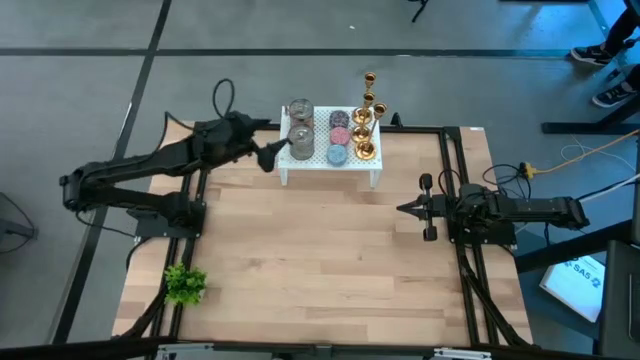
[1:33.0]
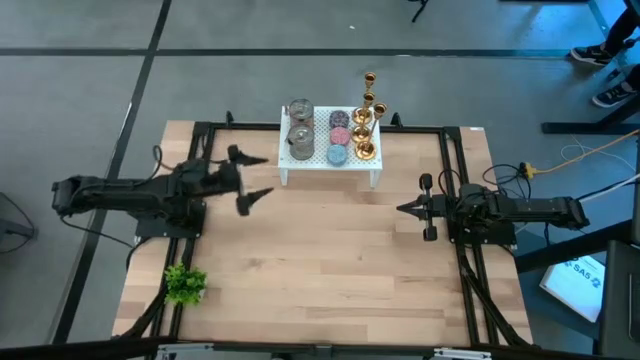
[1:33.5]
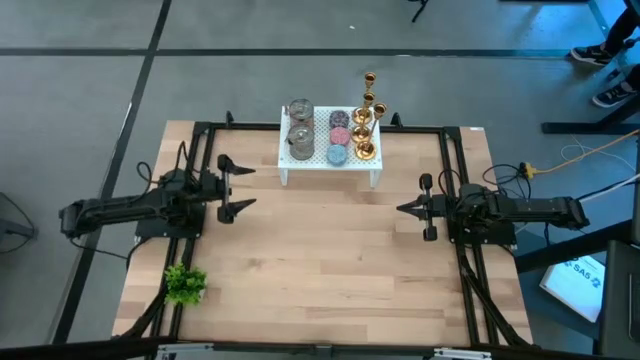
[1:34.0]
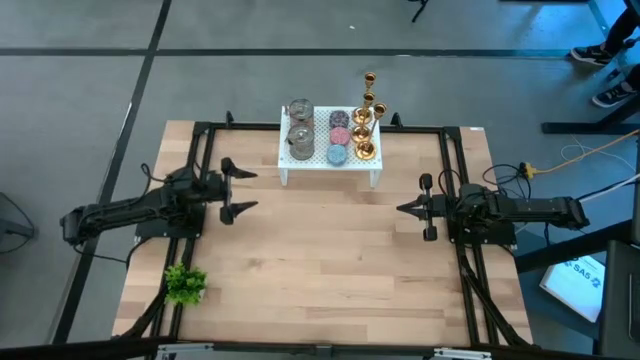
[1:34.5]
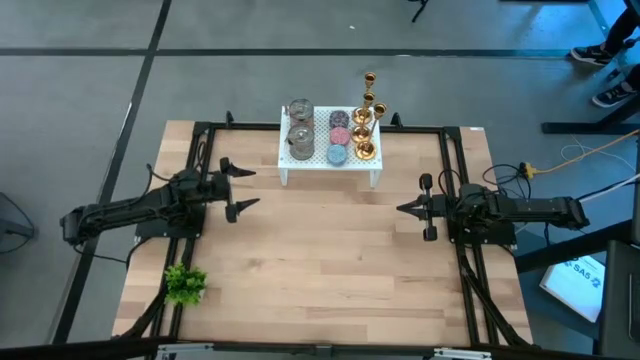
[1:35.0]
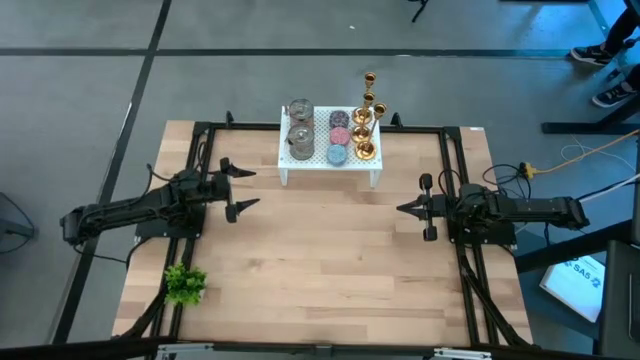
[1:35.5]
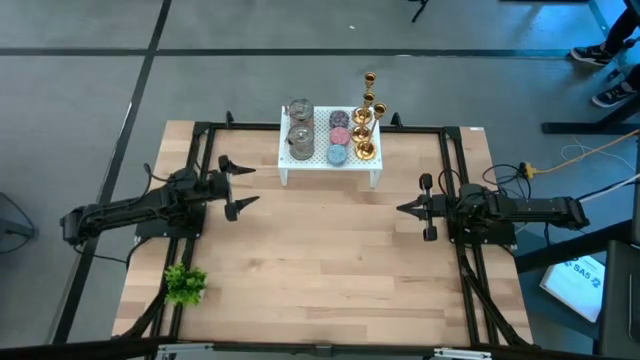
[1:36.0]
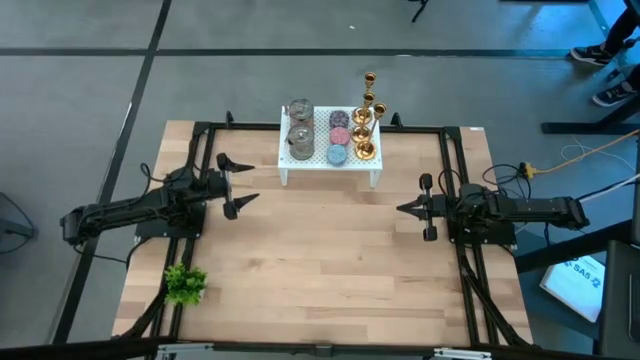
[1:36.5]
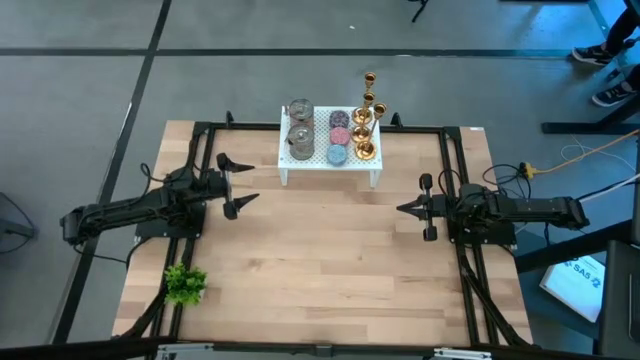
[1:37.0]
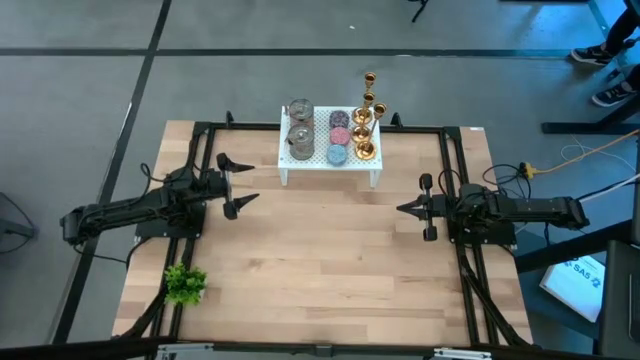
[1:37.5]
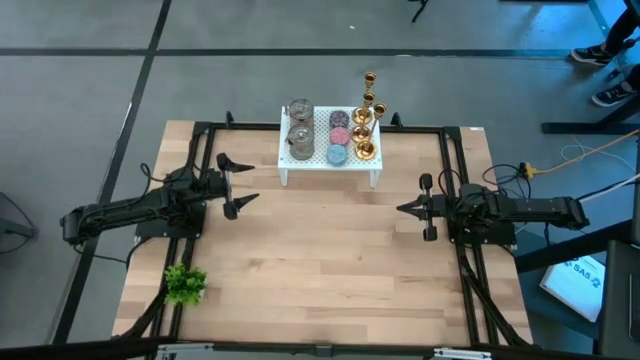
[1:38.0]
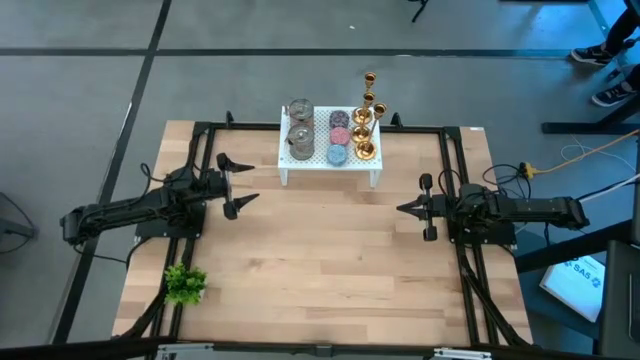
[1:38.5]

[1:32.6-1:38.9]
Task: Pick & Place candle stick holders
Return to Home Position

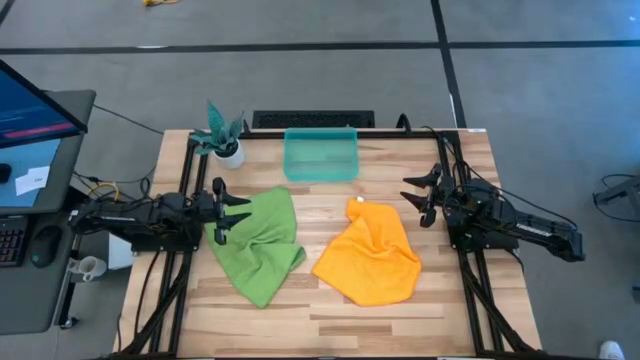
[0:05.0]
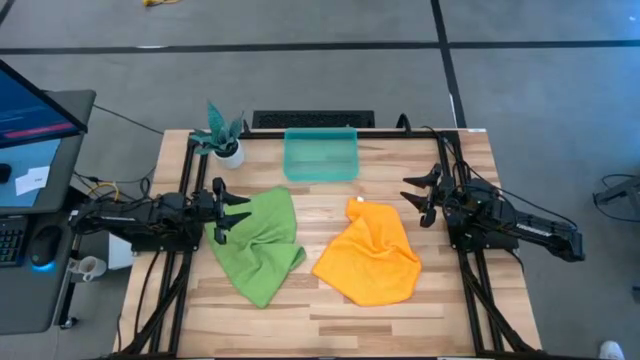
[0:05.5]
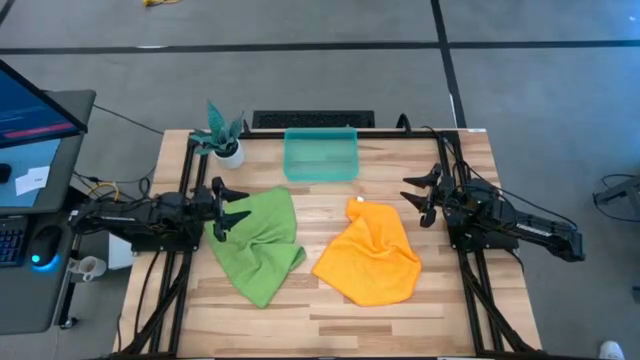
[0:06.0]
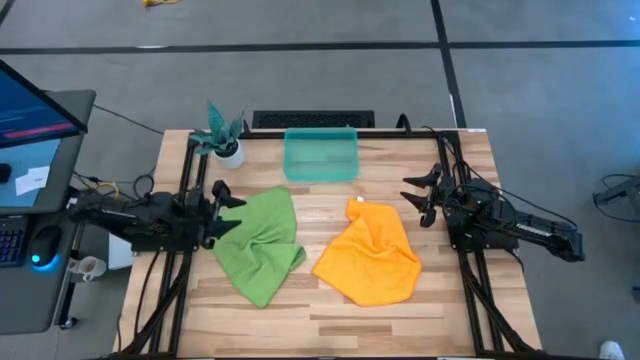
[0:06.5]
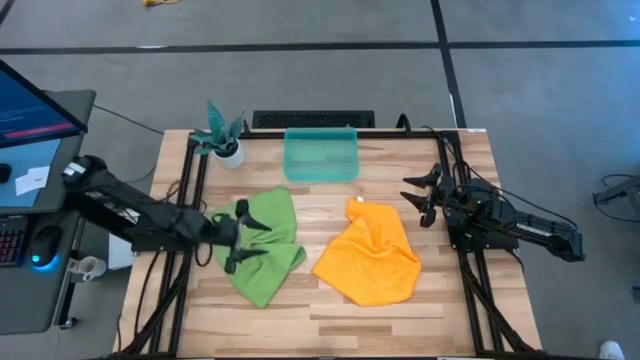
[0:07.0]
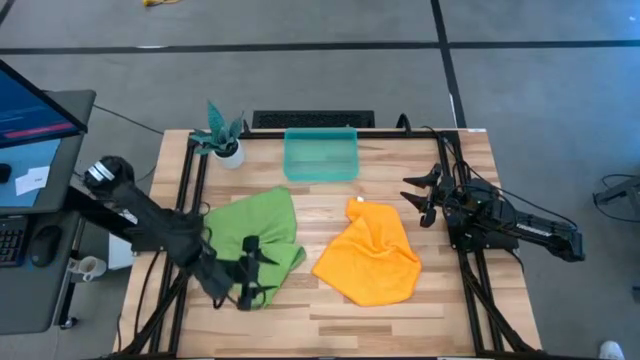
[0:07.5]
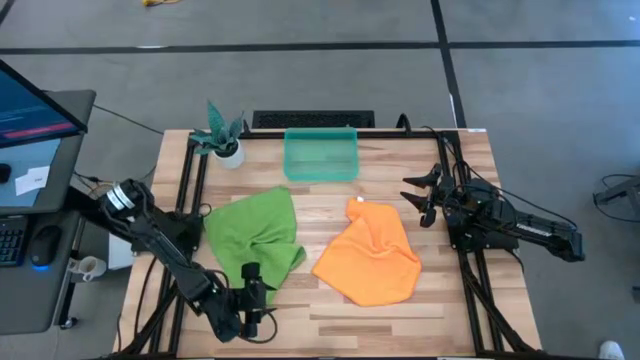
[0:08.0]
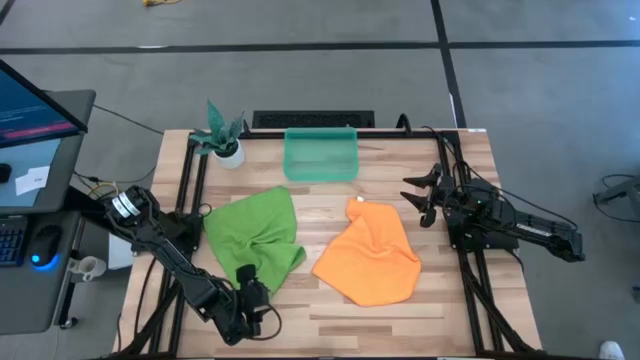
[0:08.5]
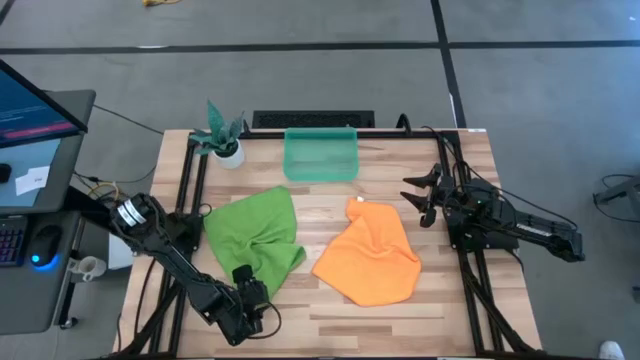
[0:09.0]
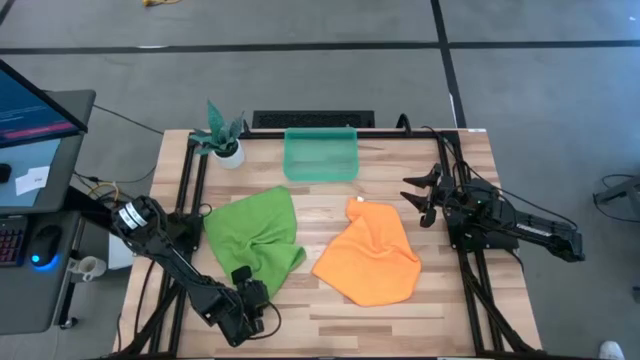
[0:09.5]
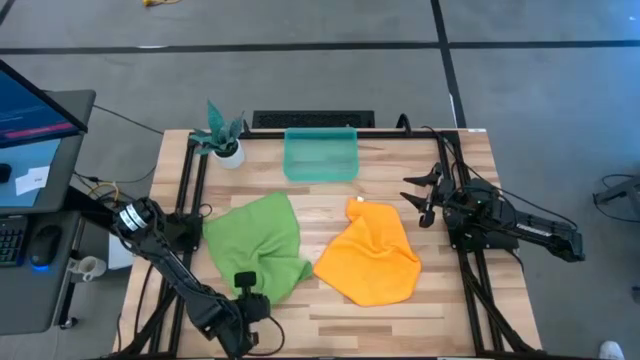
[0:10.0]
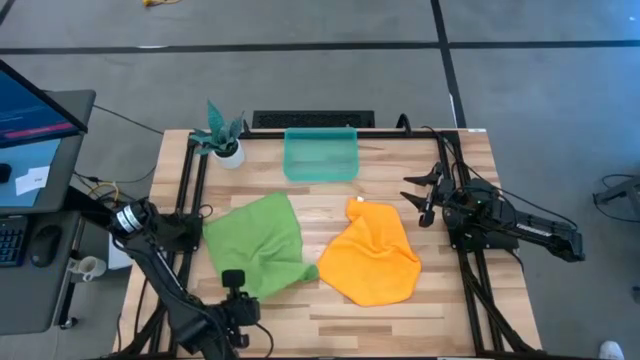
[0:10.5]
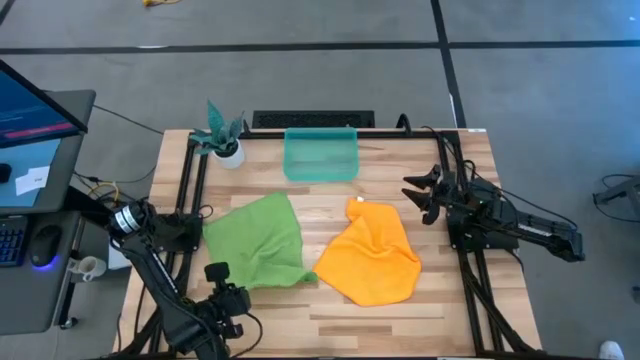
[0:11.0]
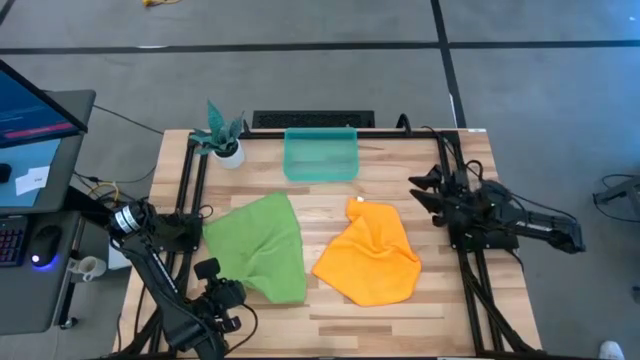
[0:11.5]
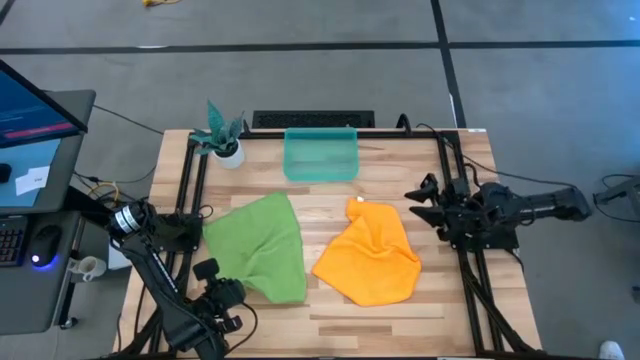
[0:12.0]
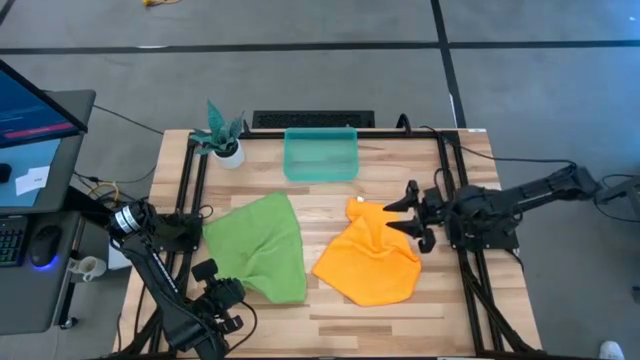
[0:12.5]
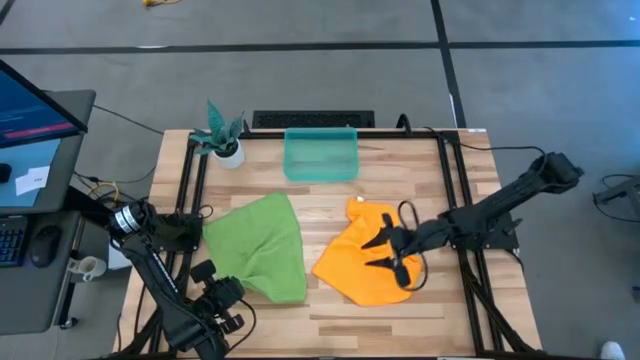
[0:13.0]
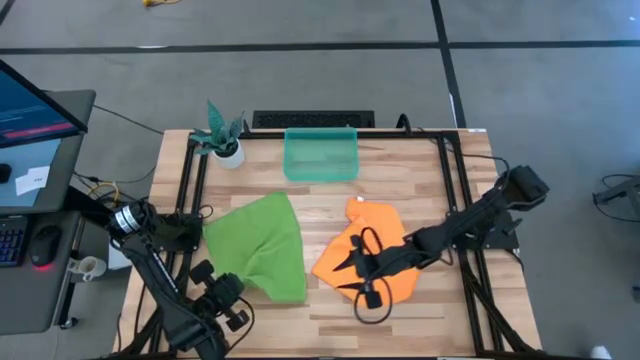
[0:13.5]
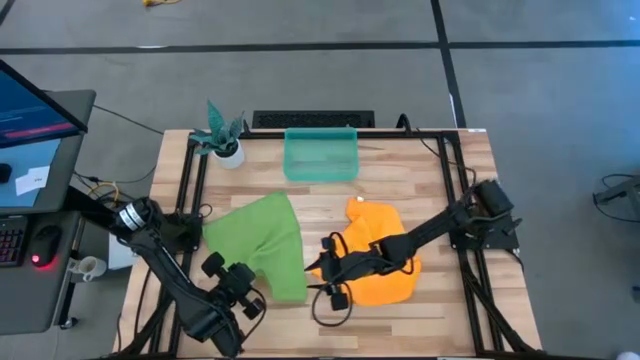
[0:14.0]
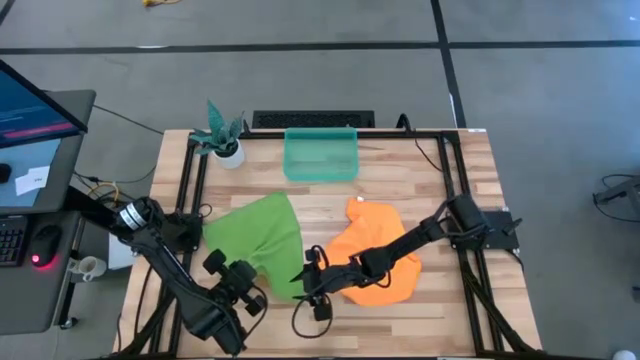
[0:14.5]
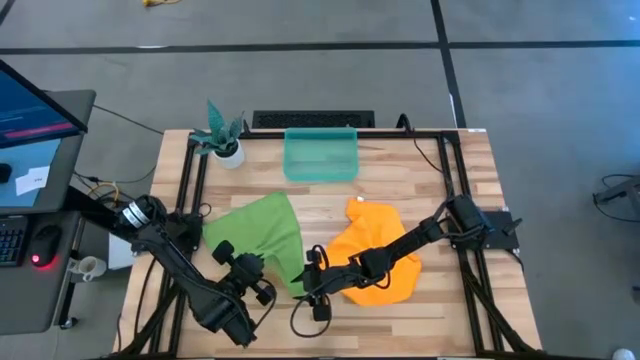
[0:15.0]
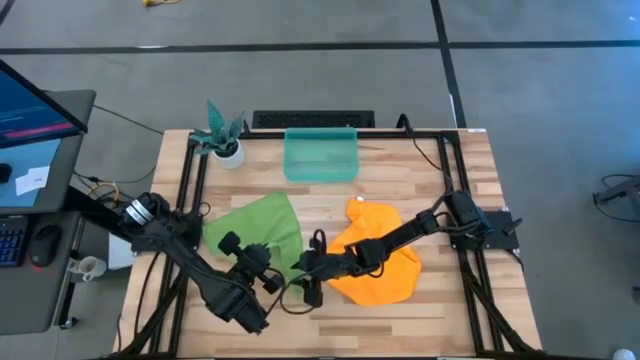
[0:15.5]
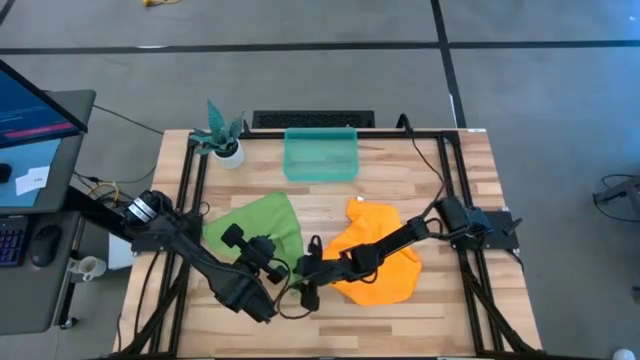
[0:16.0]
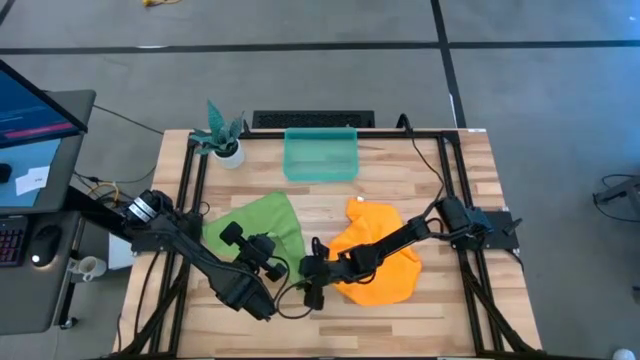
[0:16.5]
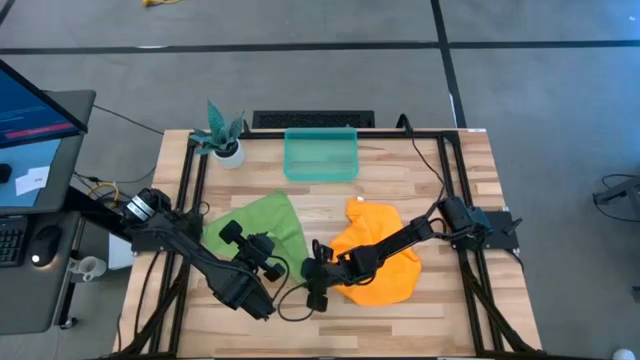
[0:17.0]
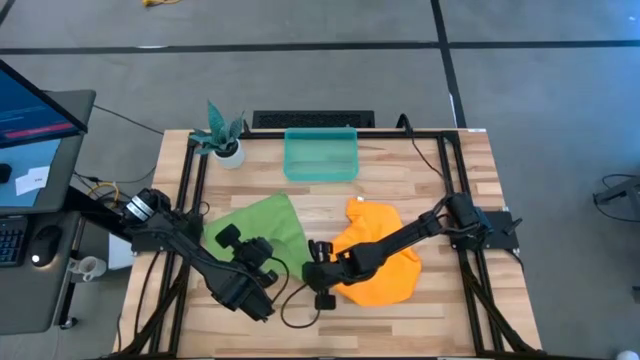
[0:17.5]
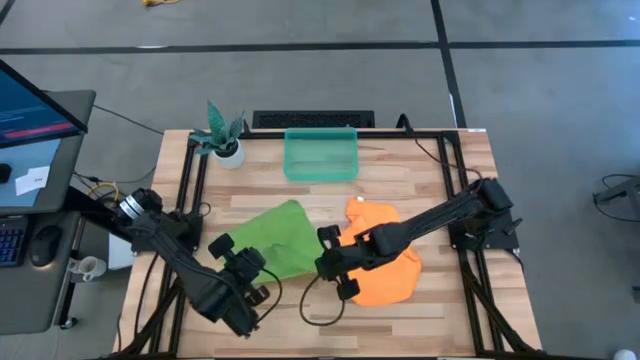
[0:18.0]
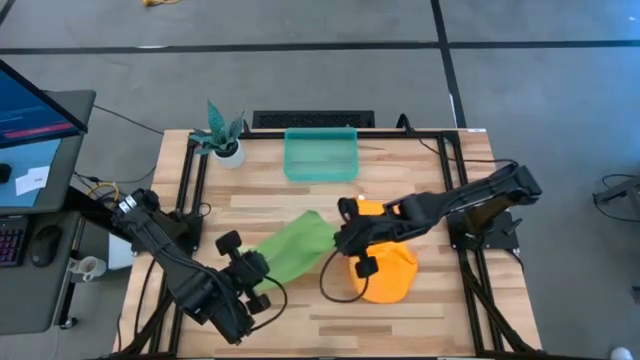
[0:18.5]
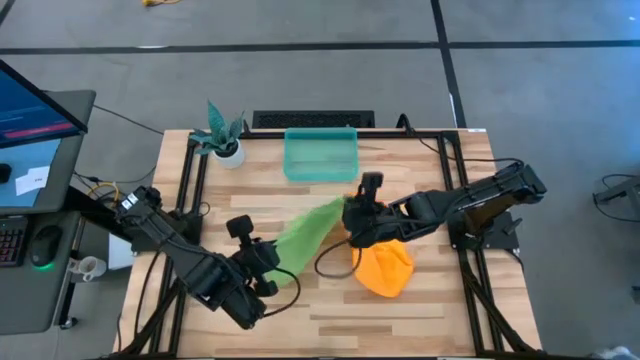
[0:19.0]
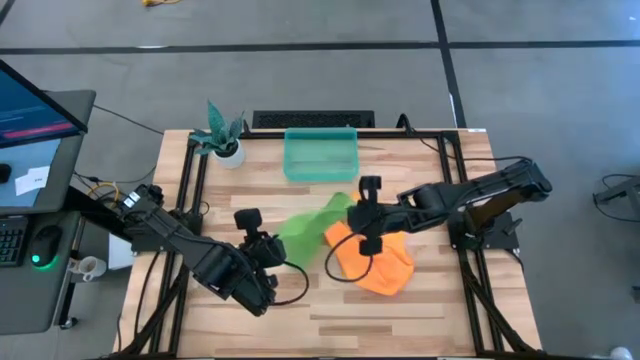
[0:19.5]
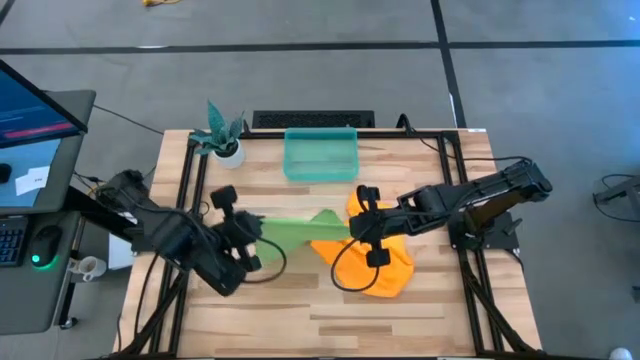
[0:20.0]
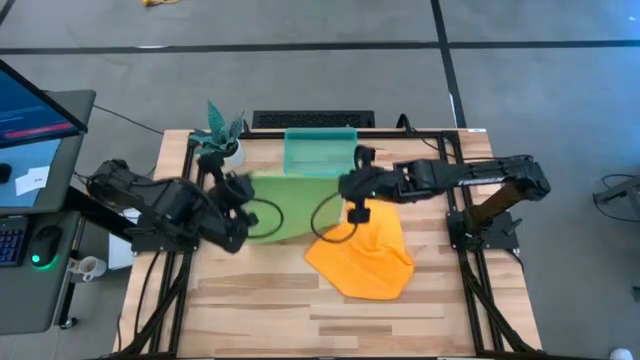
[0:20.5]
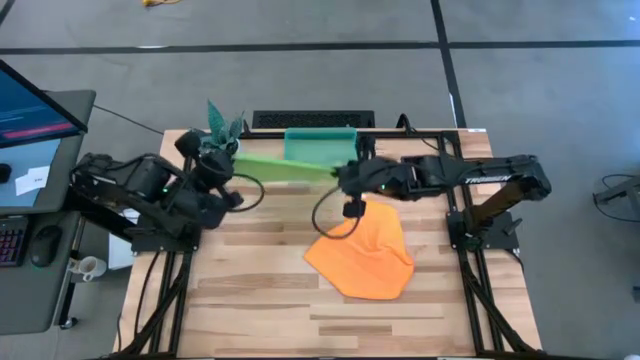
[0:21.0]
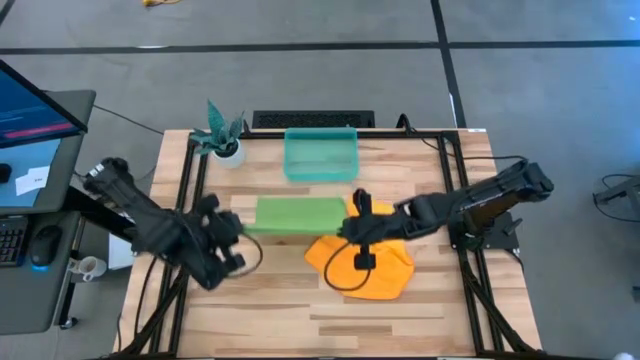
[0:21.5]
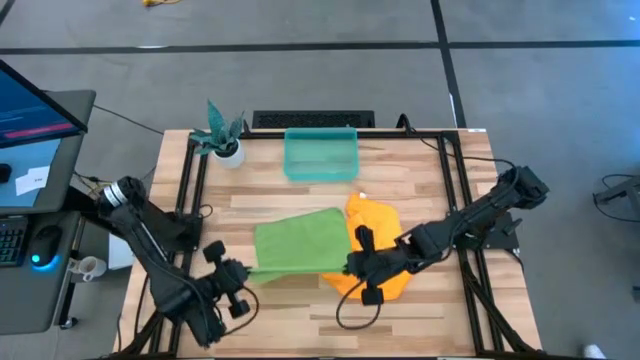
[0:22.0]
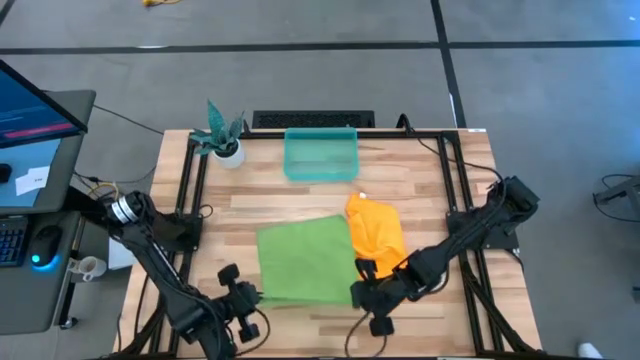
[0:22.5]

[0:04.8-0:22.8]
Task: Roll microfiber towels into tight, uniform cylinder then place into a basket
Fold the green towel
